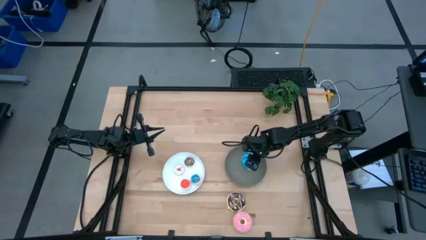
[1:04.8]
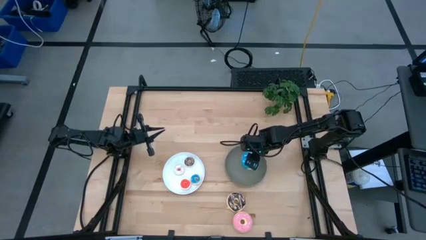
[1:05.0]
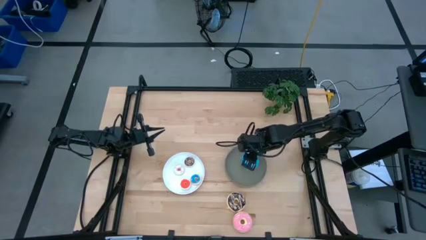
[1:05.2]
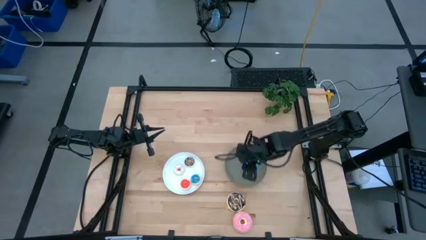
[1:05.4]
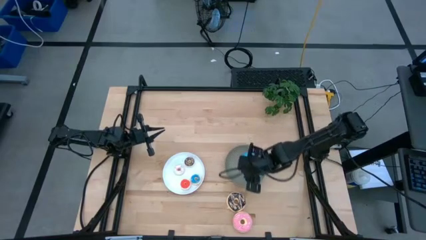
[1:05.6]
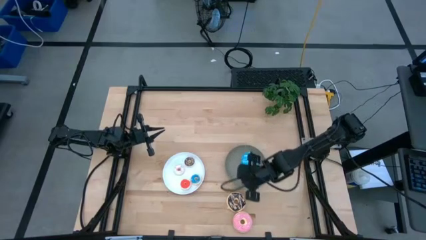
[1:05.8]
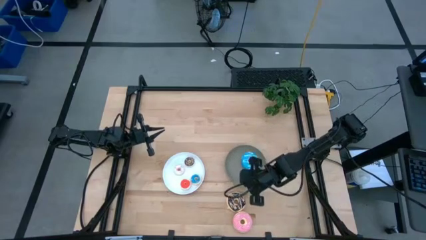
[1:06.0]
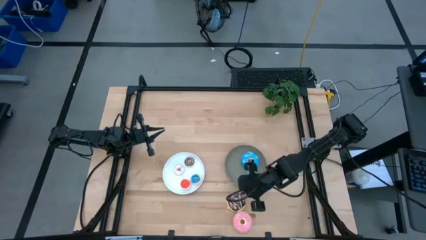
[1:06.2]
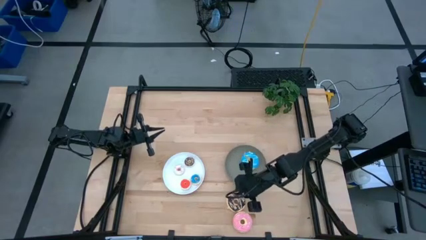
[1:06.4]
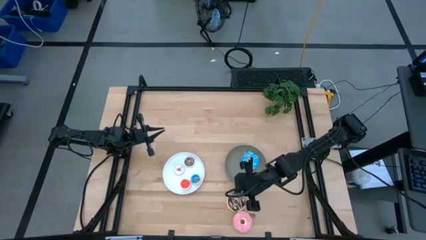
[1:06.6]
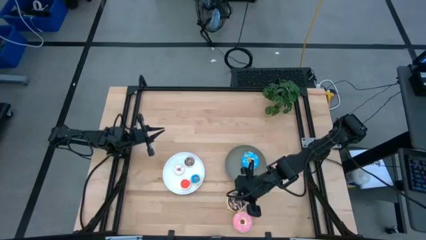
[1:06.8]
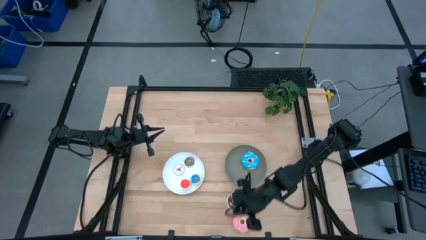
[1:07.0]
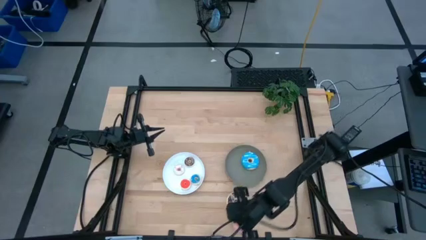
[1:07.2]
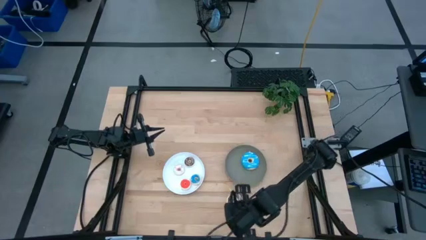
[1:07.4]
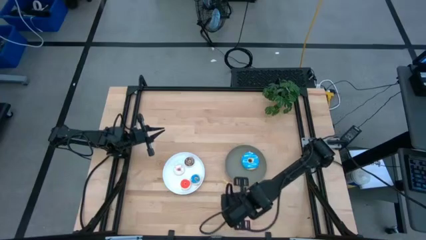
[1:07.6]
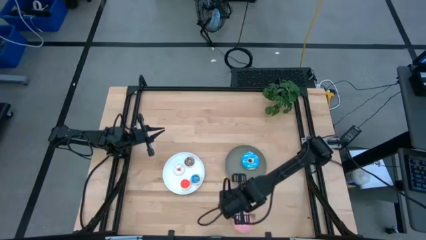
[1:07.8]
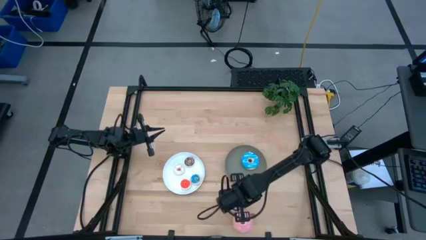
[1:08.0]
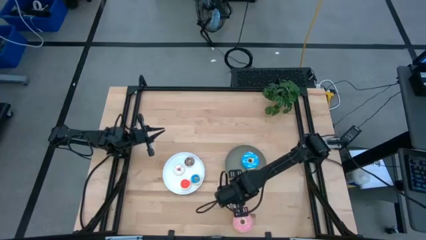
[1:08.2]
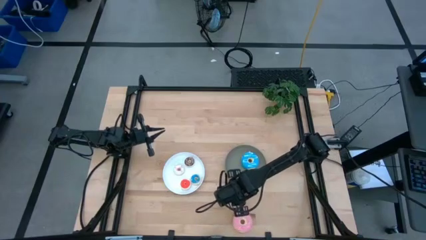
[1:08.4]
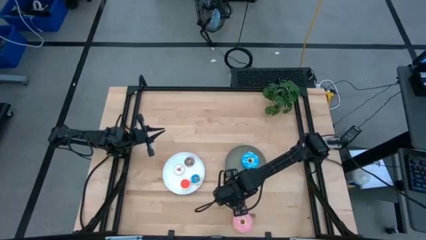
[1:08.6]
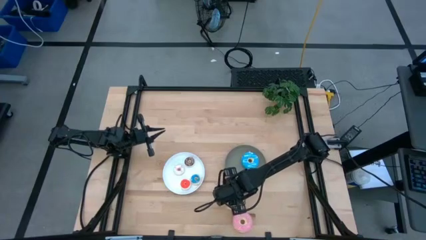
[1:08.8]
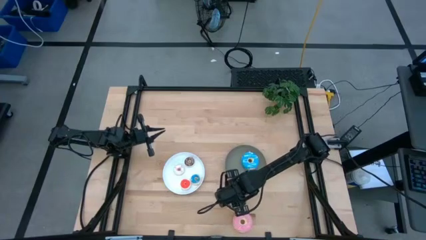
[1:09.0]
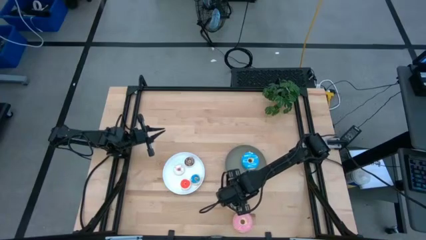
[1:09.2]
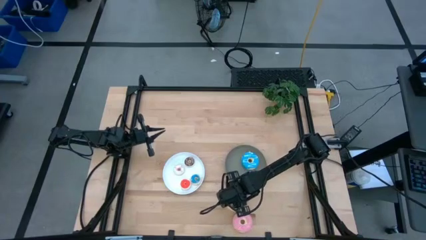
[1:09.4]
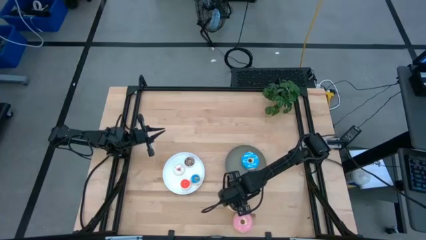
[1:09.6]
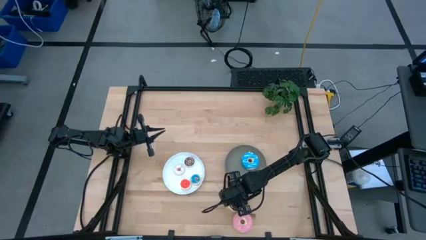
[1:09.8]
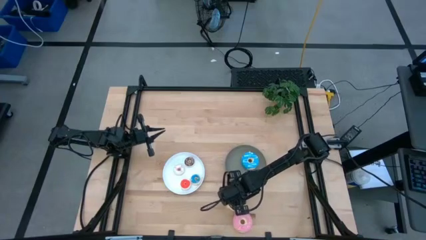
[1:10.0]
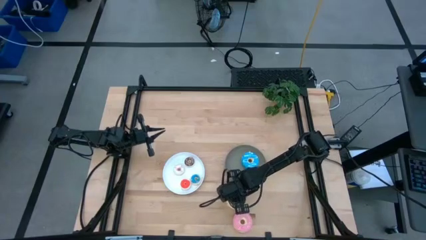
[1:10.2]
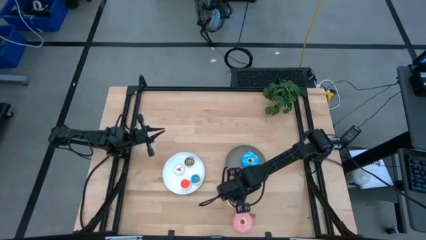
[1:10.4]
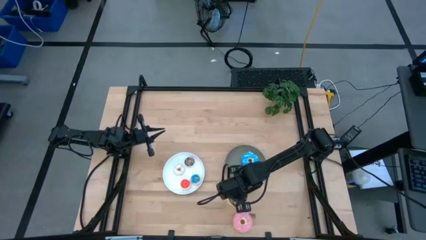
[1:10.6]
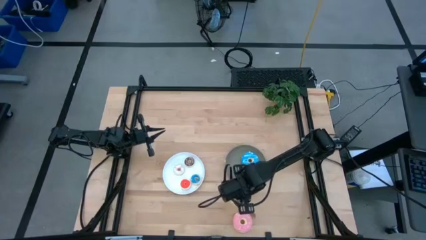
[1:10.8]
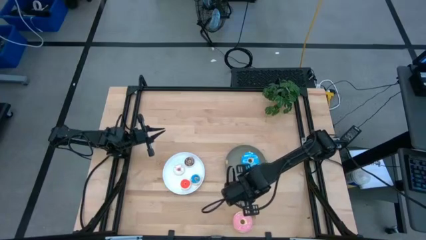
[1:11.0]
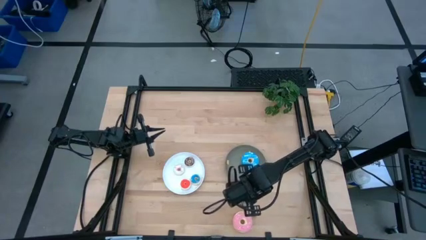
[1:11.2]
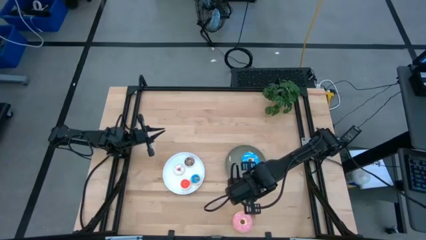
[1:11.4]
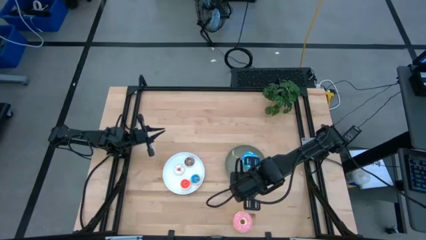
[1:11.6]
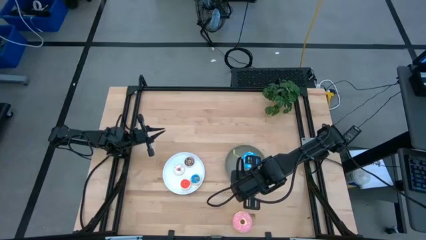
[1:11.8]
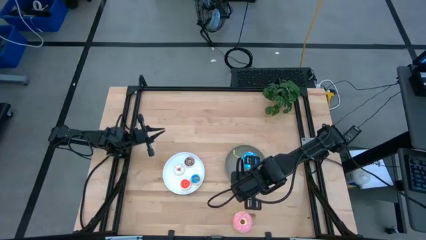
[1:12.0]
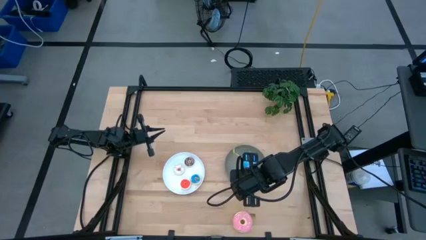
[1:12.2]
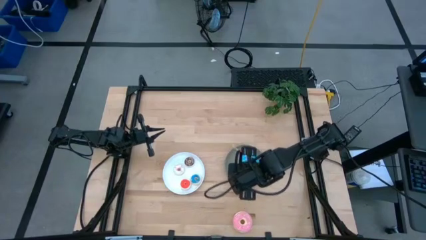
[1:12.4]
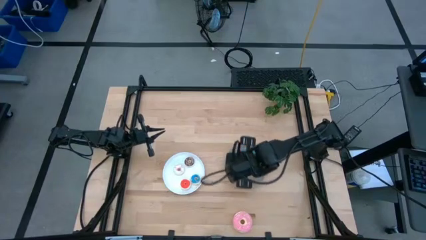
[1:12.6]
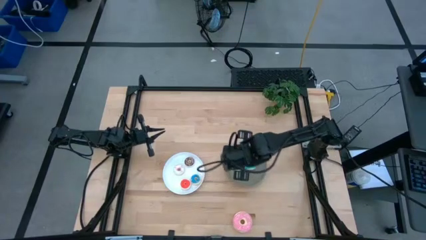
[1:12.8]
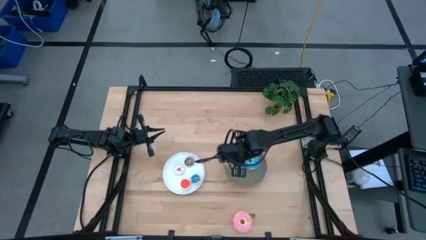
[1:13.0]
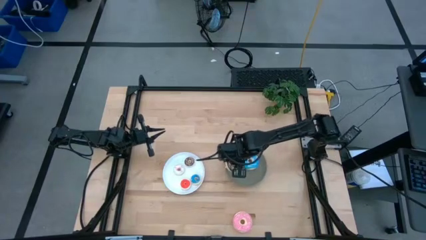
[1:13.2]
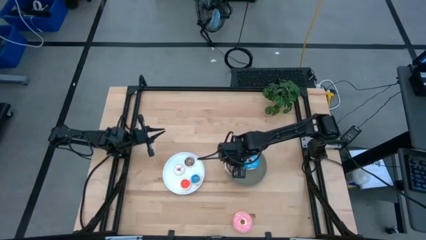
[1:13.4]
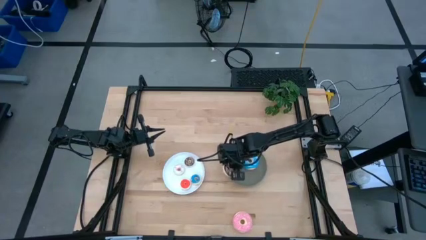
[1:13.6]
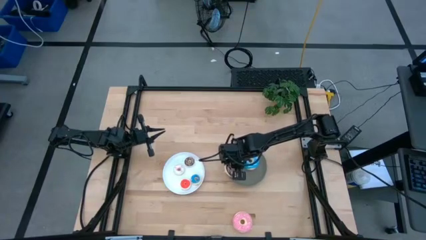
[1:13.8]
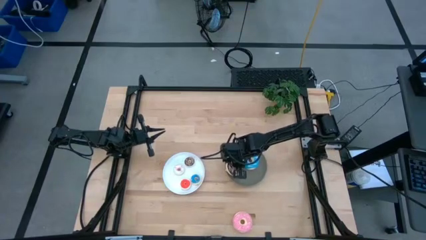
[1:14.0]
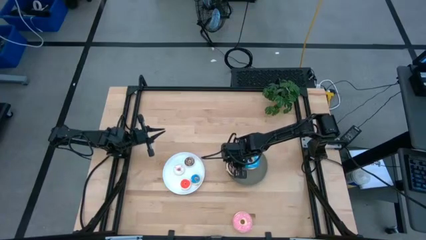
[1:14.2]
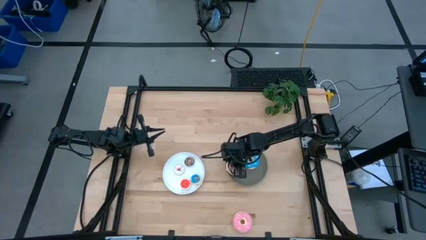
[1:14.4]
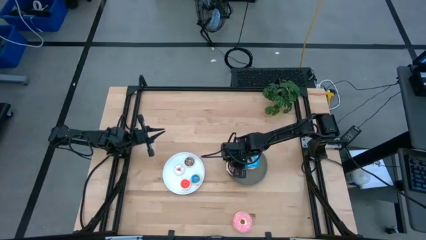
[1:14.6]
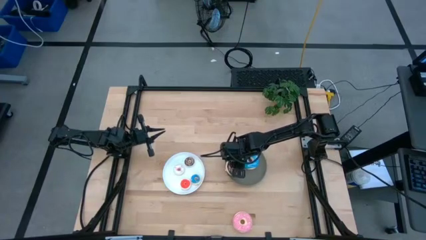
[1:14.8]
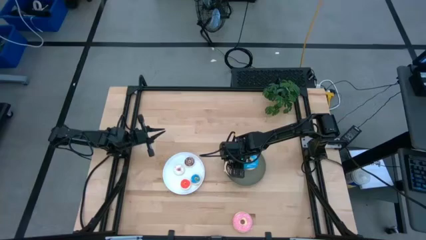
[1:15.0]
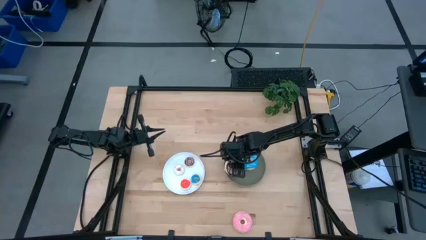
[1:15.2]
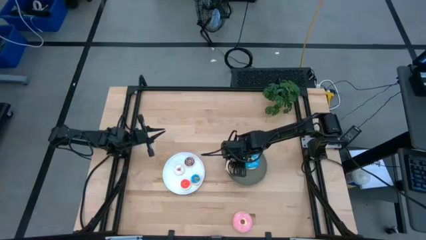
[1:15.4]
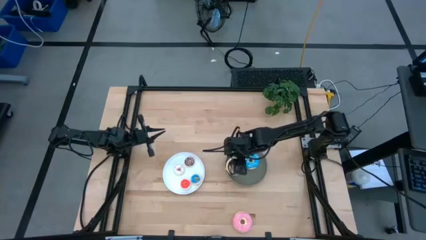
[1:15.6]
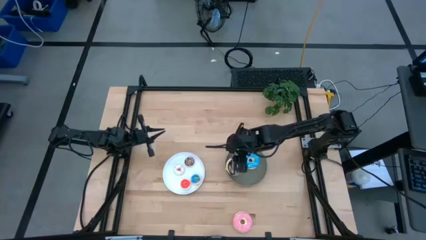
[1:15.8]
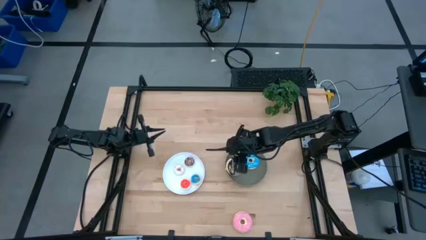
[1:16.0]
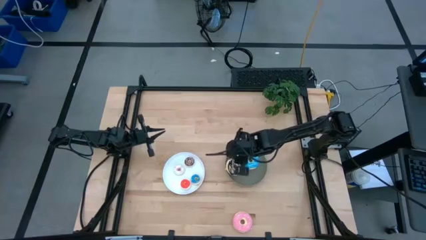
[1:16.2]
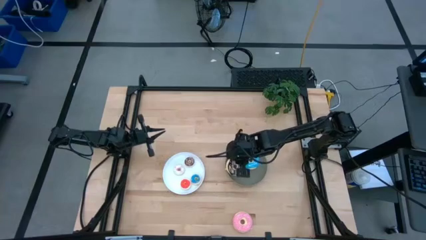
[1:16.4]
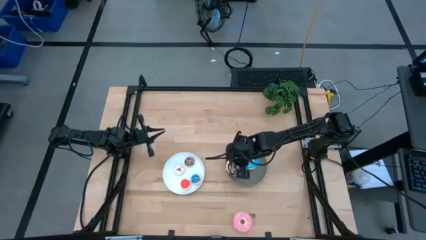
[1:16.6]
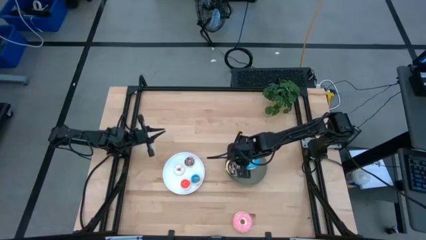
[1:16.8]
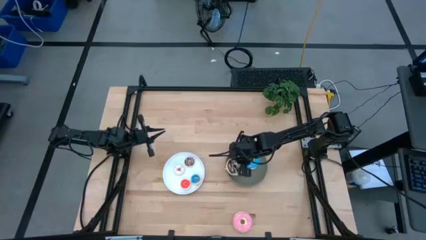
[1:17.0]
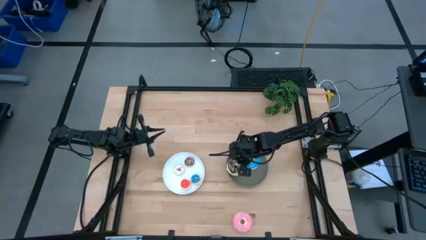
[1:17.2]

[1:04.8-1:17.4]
Task: Pick & Place donuts
Put the large black donut on the gray plate

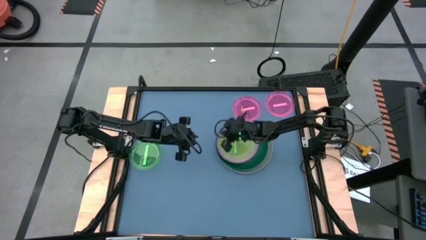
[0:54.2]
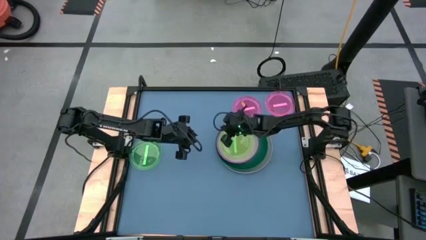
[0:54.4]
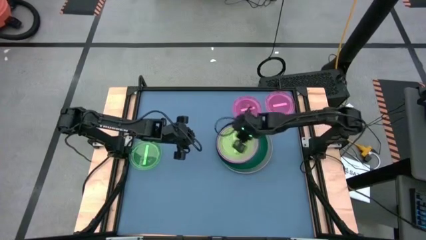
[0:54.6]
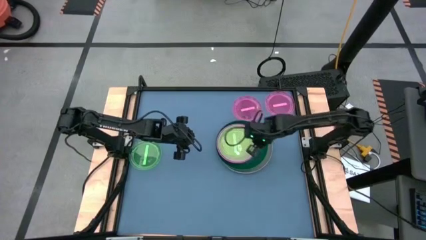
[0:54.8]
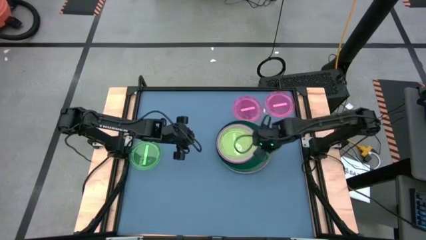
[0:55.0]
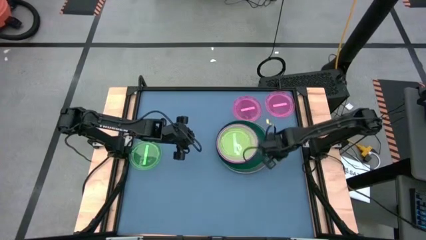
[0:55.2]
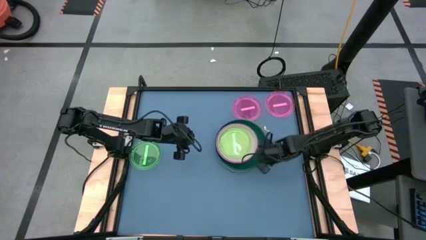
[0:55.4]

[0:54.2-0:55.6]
Task: Stack plastic plates
Move the stacked plates

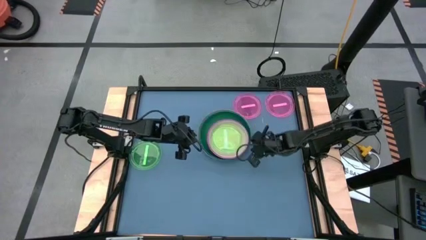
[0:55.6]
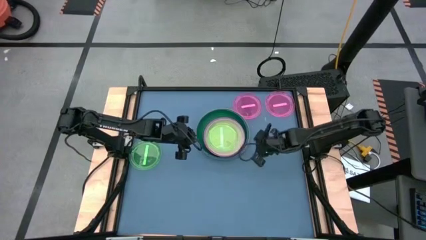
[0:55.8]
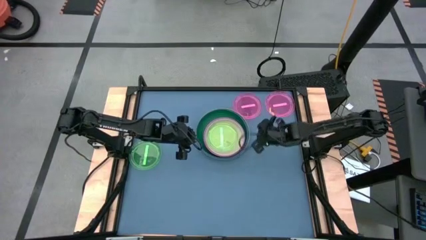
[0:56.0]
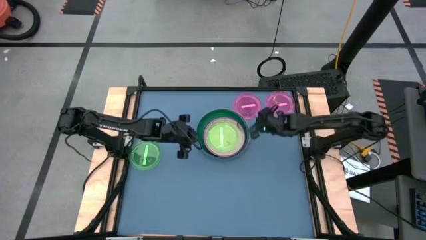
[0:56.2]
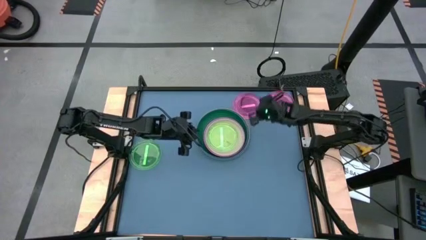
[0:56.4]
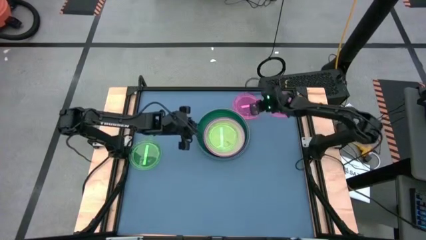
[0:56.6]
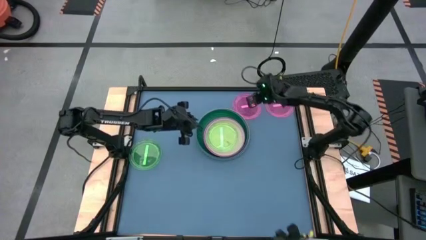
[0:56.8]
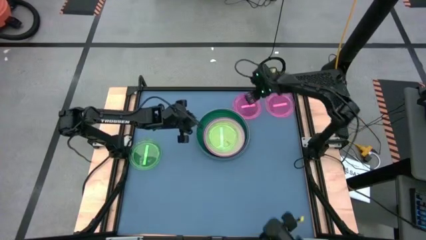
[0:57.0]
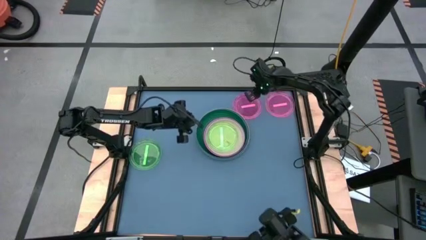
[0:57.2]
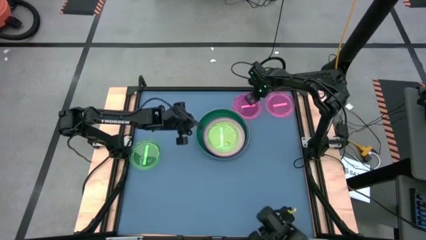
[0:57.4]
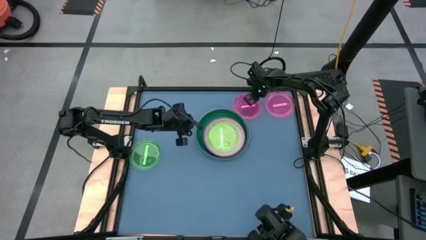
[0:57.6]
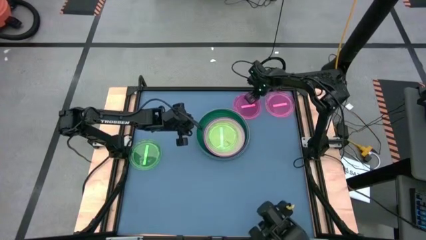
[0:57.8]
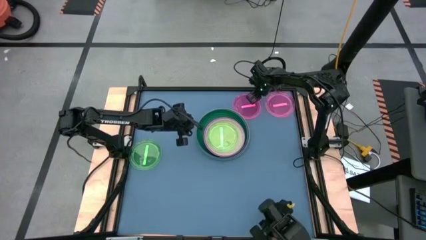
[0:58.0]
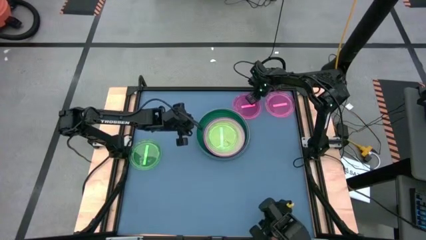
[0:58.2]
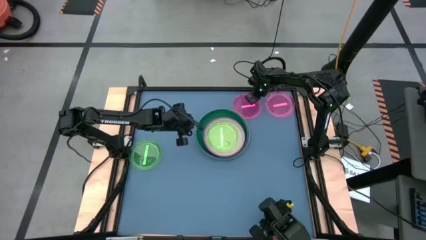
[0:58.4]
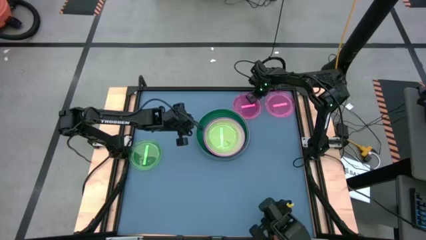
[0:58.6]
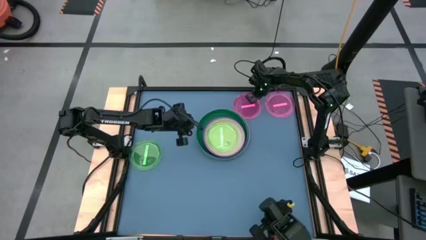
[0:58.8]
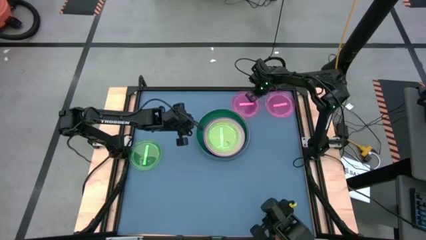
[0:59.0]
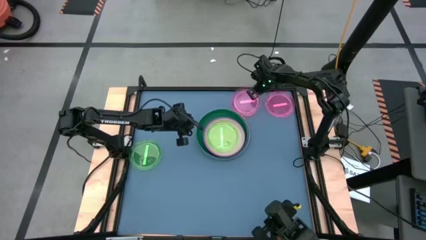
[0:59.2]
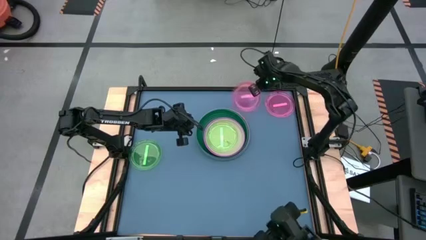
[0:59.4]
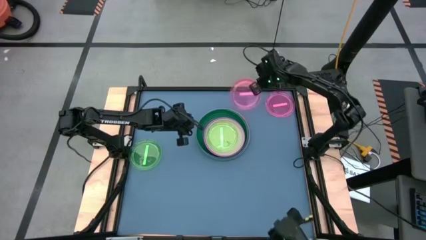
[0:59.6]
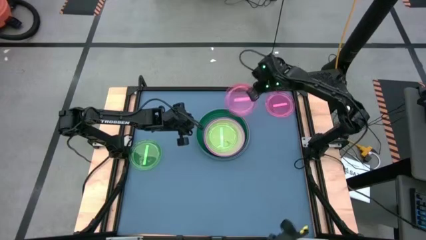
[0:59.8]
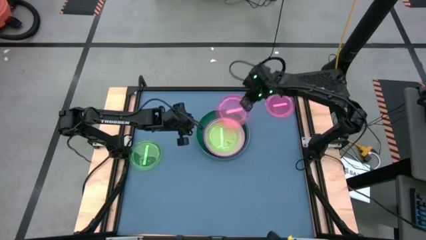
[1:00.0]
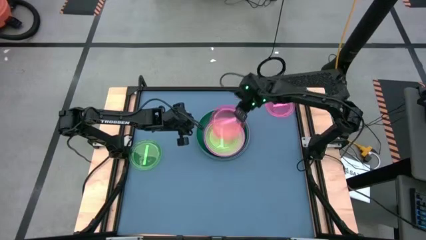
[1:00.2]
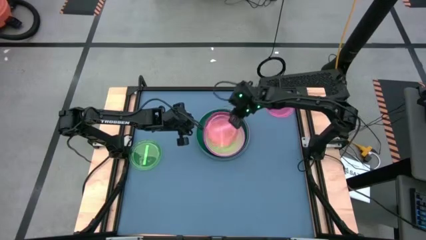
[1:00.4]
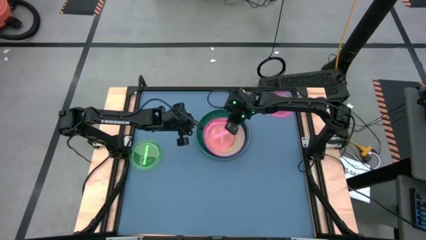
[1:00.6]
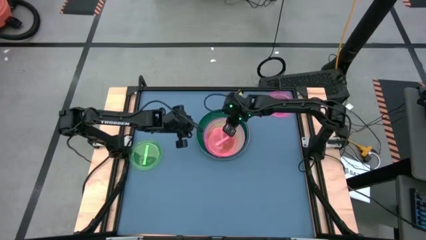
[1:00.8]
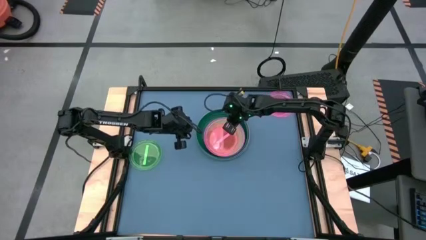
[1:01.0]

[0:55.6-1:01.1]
Stack the left light pink plate on top of the light green plate
